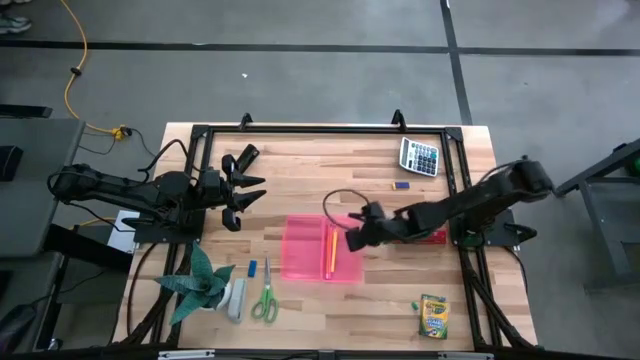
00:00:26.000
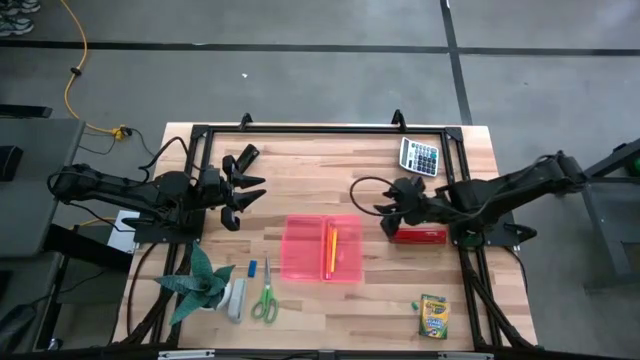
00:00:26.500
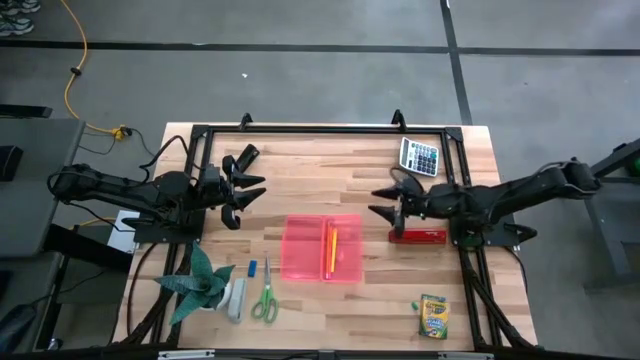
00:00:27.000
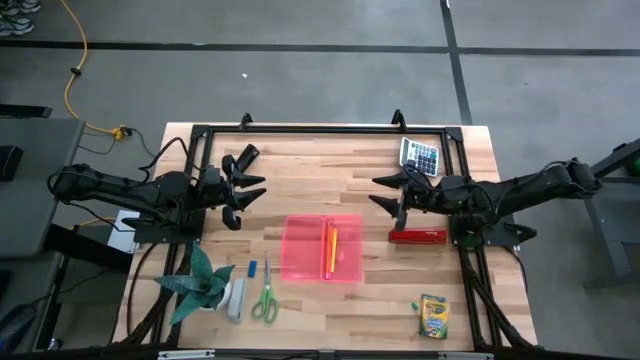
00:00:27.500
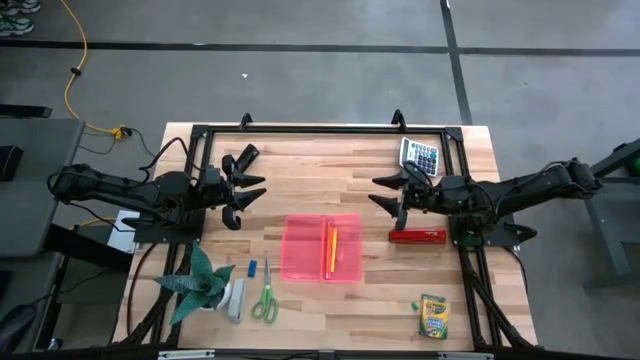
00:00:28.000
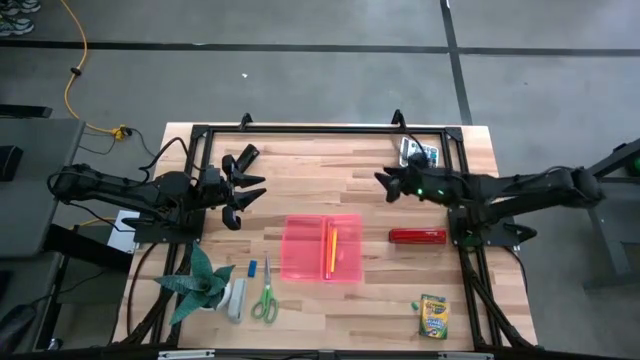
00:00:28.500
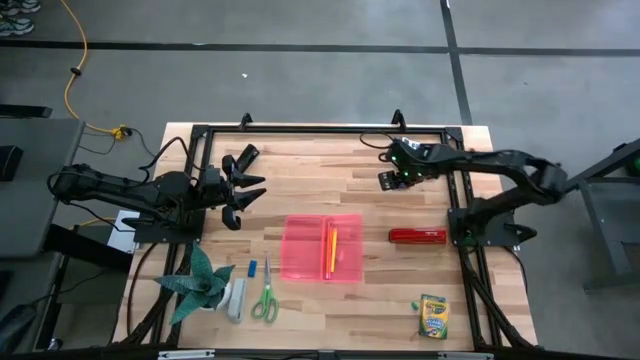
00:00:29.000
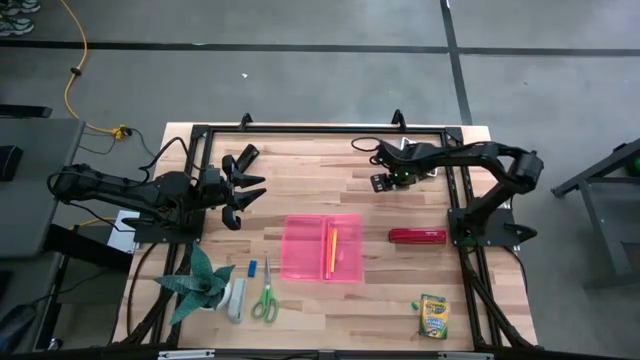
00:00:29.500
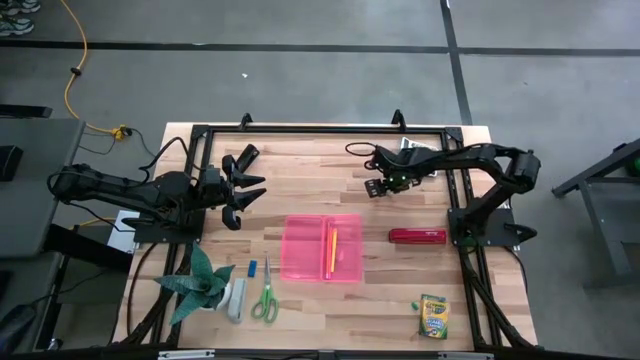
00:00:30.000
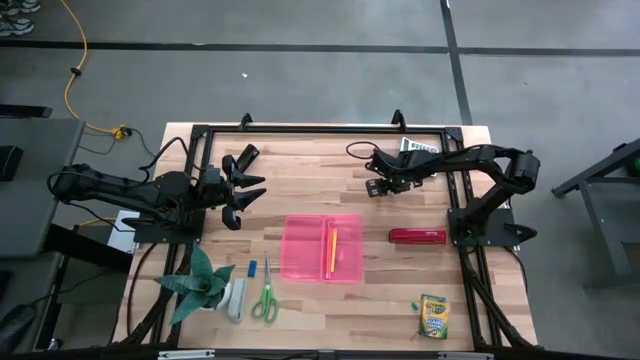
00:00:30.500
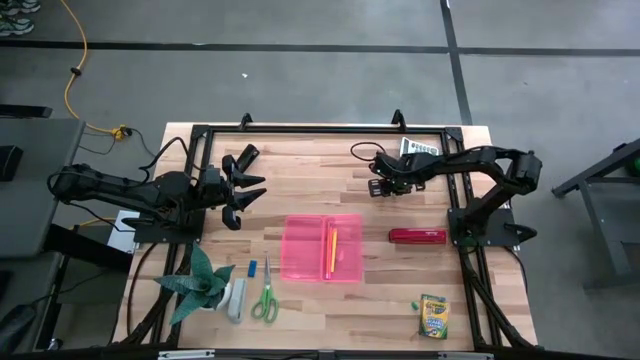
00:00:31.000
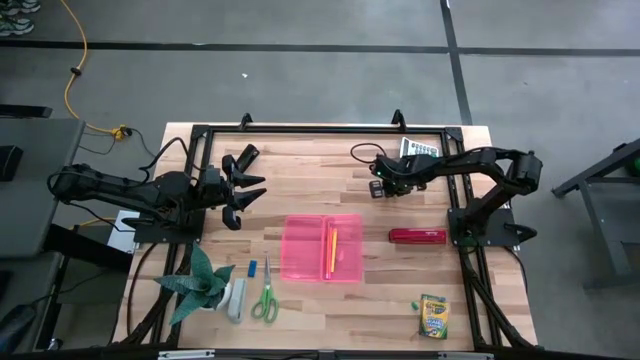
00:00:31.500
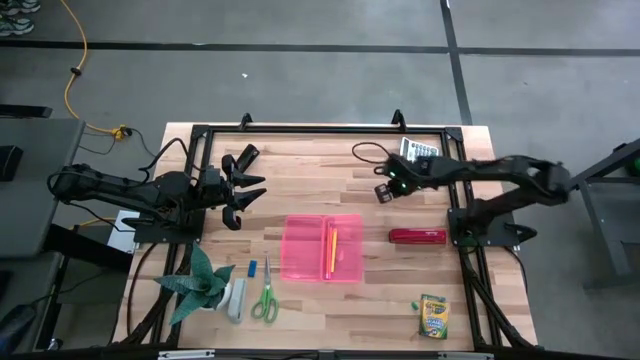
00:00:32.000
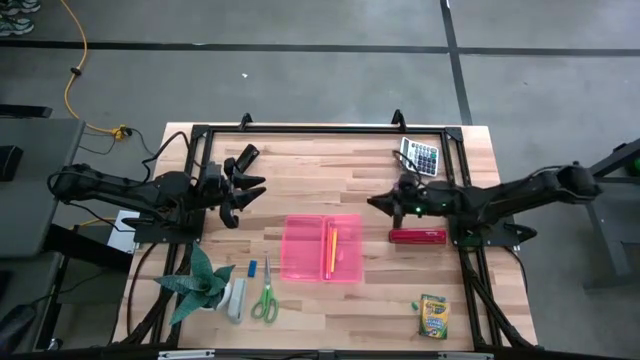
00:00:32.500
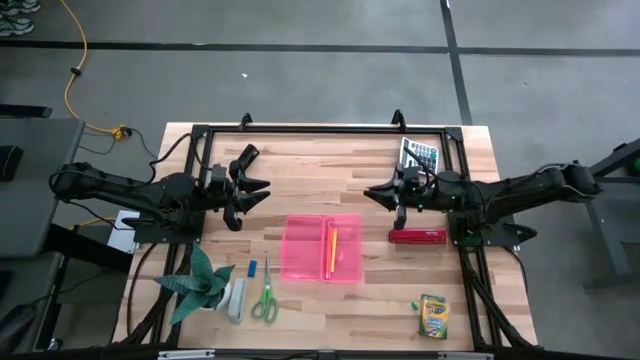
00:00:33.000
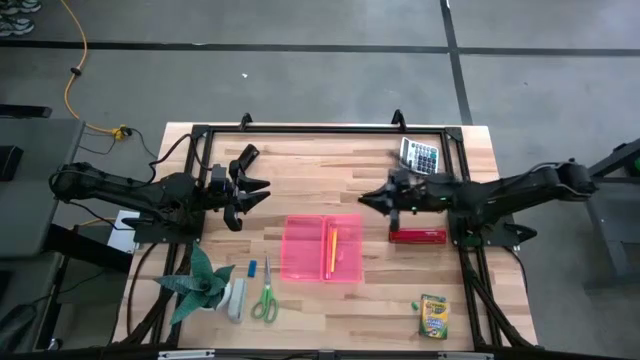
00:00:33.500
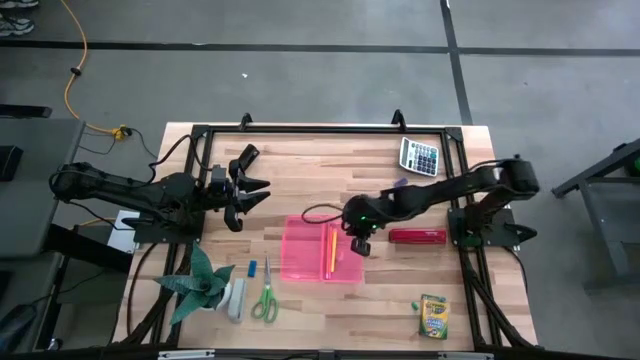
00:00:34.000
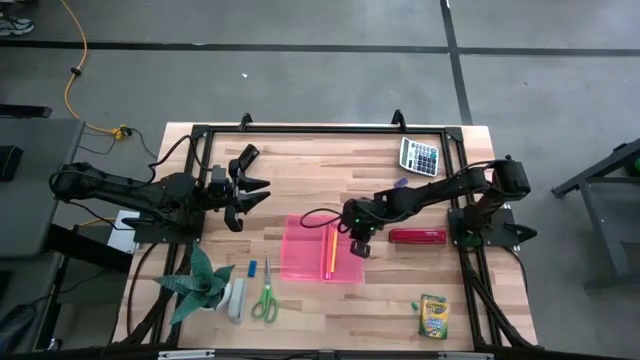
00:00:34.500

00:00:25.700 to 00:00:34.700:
Task: Pack school essentials
Put the small yellow eraser into the pink supply box

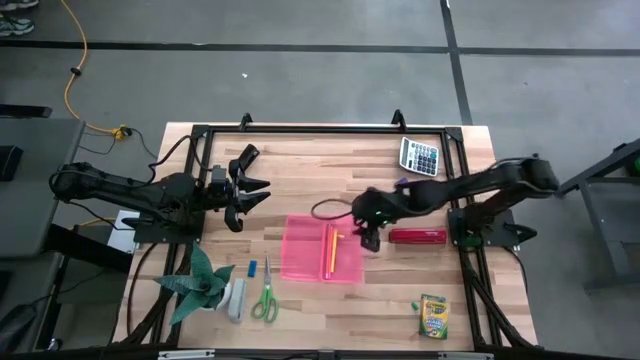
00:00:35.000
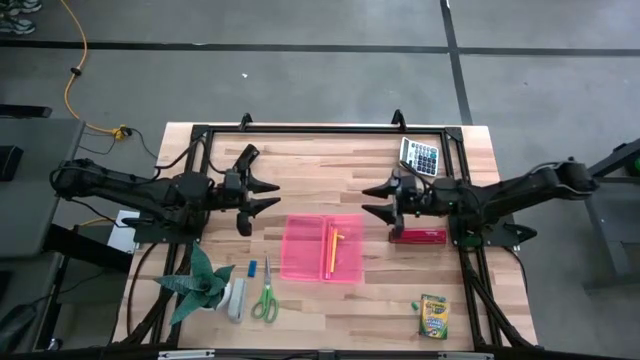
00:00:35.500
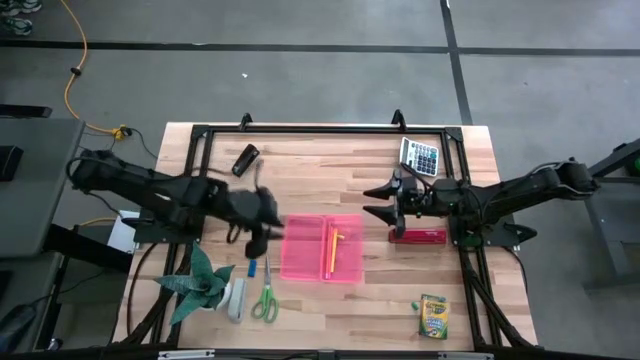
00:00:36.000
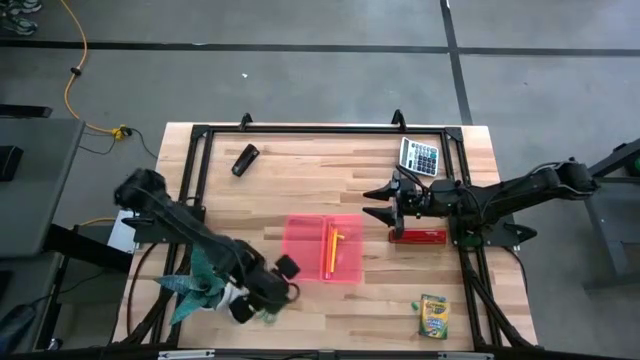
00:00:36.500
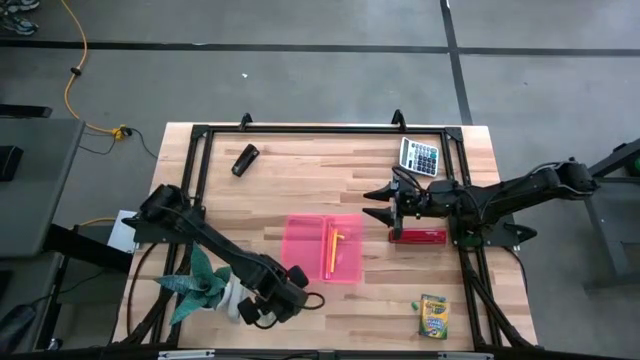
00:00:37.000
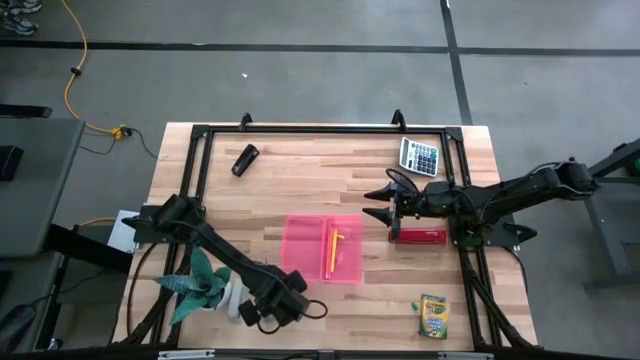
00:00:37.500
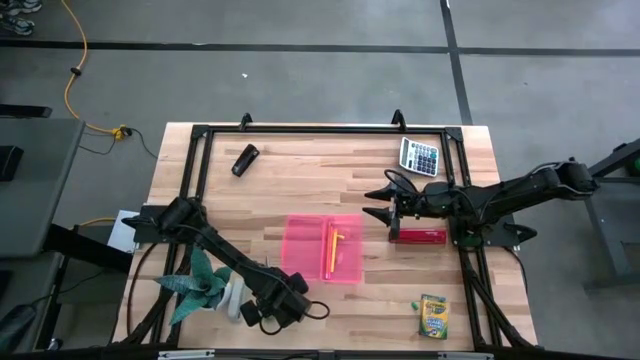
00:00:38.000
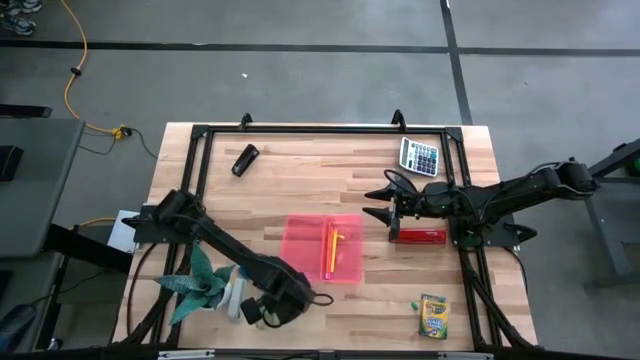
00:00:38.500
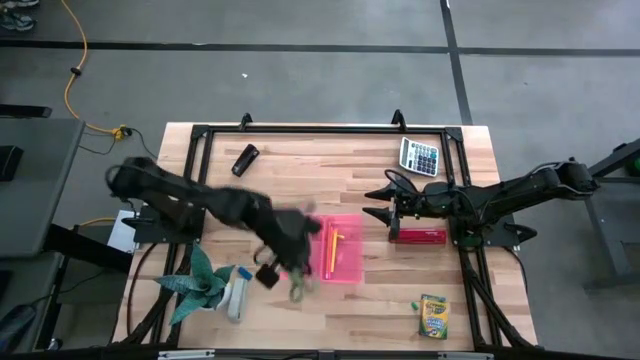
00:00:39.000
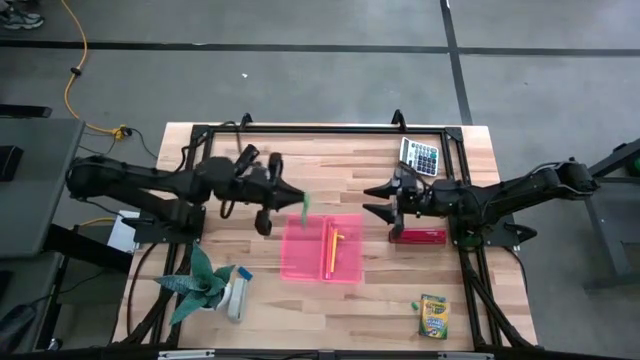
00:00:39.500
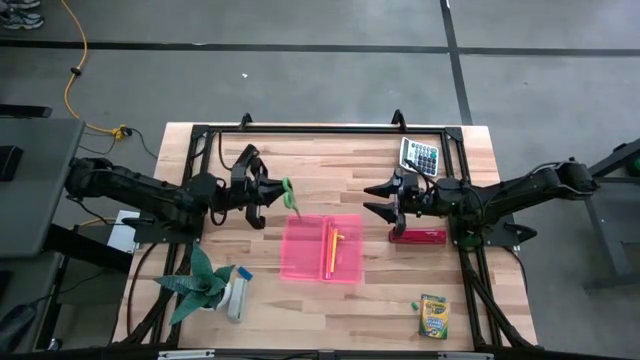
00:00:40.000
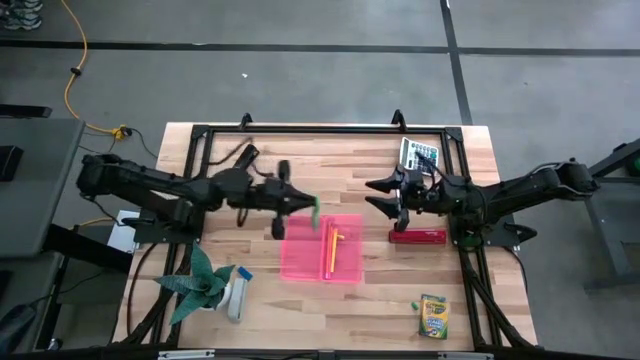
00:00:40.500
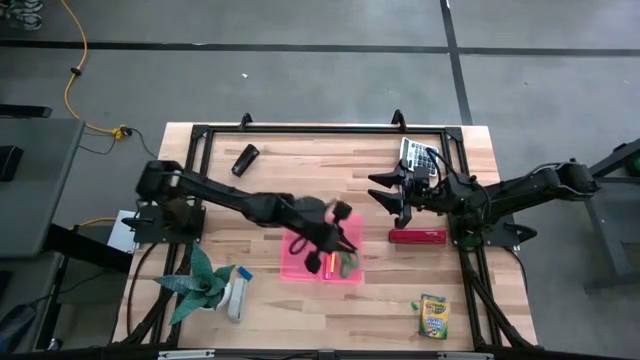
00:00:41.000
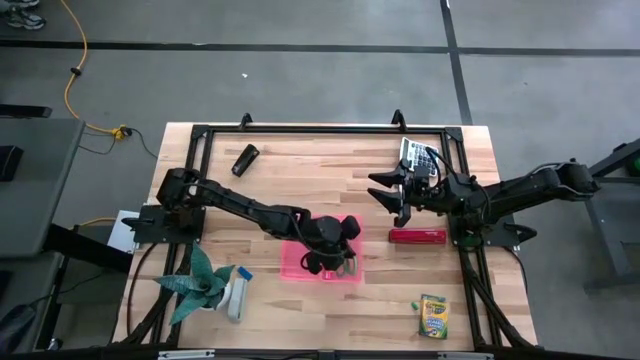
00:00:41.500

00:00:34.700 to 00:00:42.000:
Put the scissors into the pink supply box

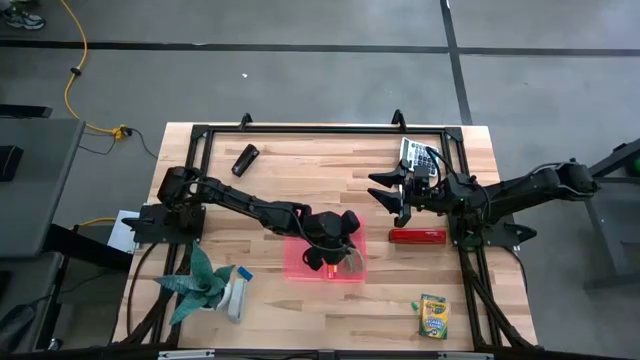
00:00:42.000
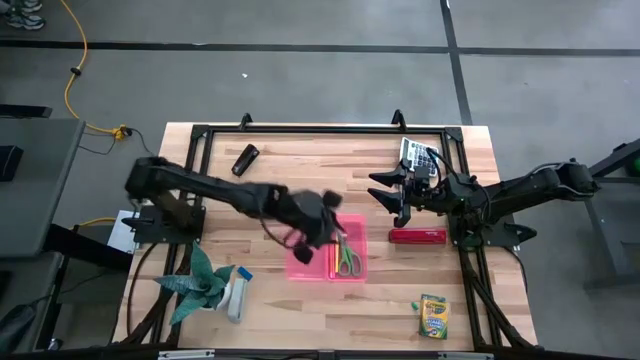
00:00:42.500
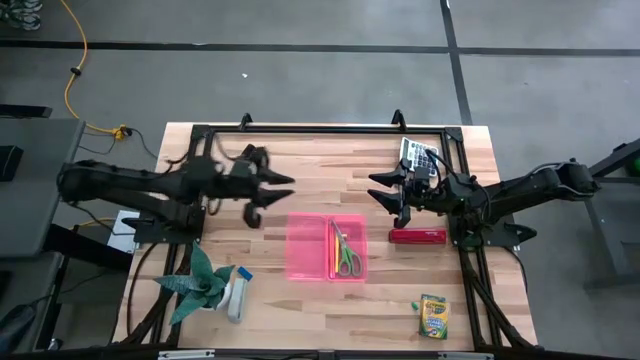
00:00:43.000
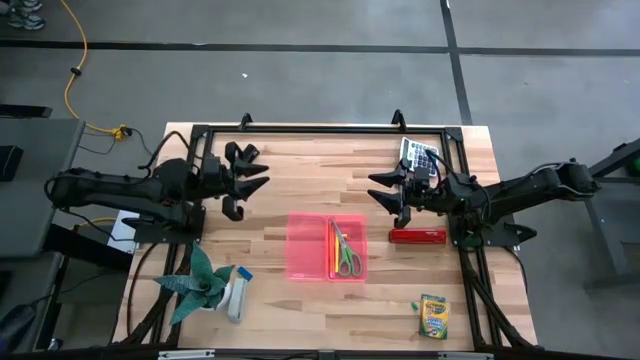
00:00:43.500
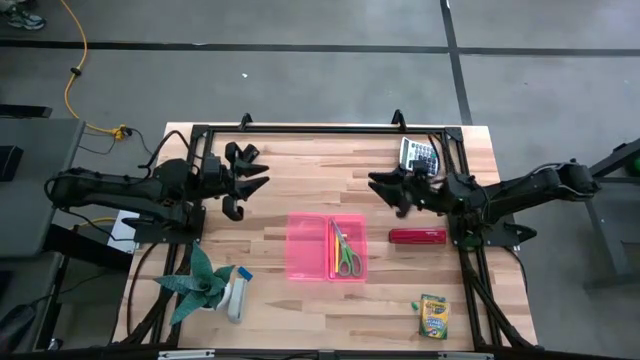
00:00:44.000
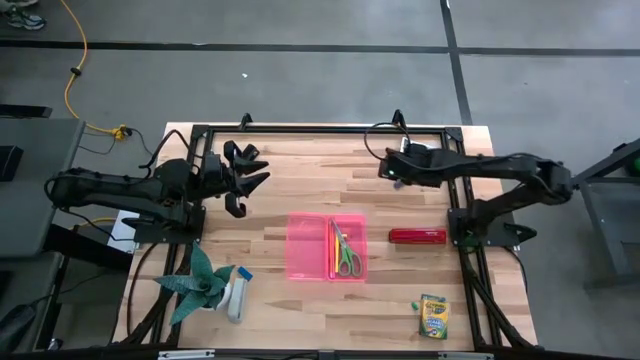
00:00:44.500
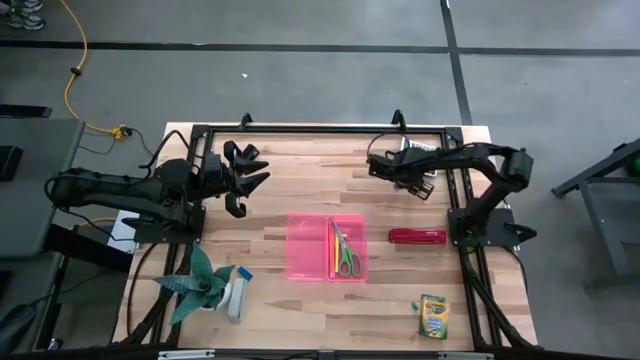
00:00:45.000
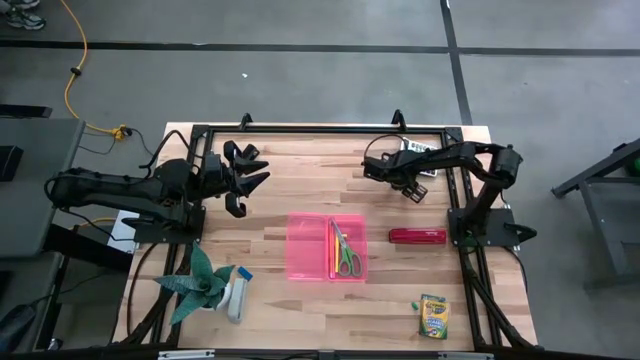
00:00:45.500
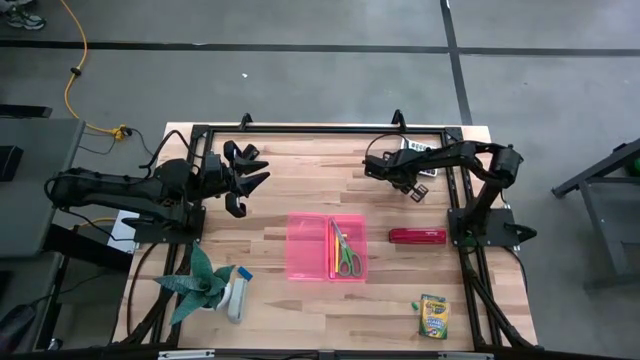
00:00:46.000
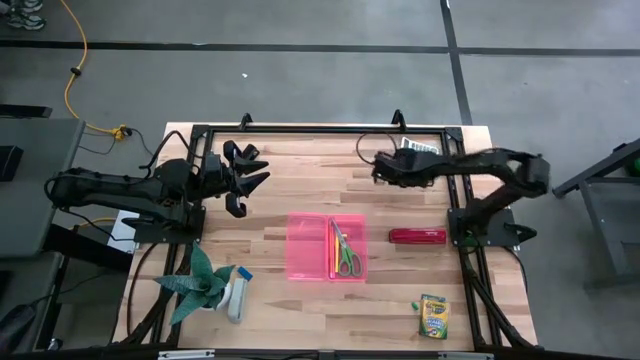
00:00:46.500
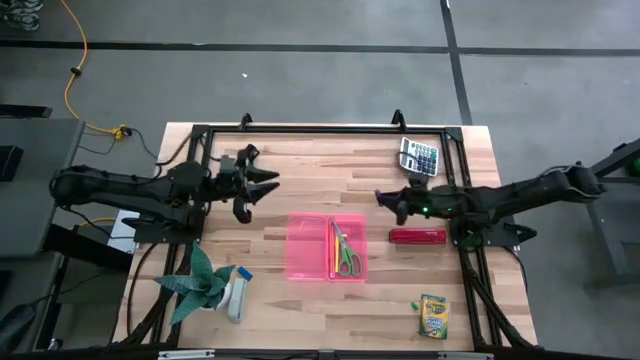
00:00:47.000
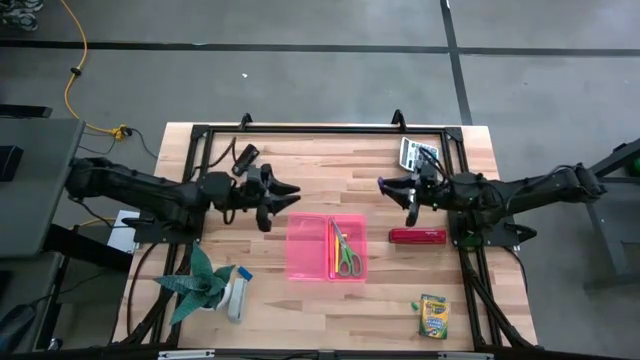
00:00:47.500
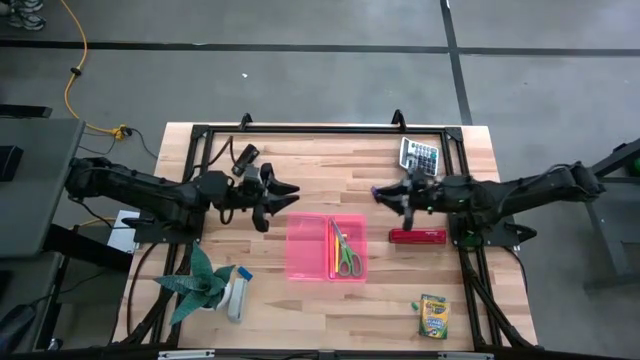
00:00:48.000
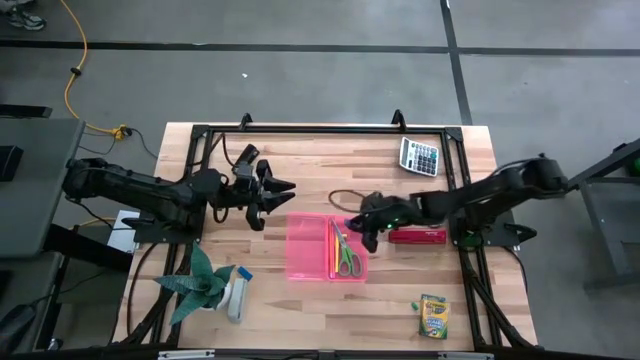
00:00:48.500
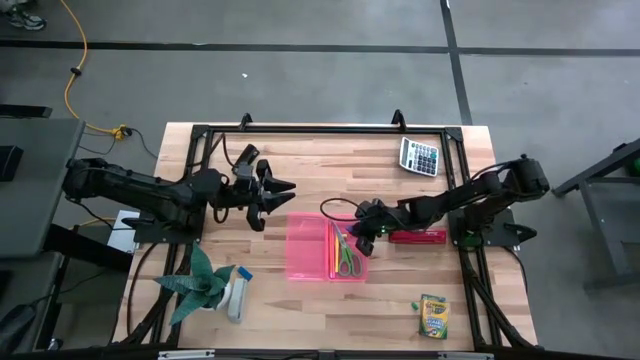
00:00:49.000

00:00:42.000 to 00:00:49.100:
Put the right blue eraser into the pink supply box
